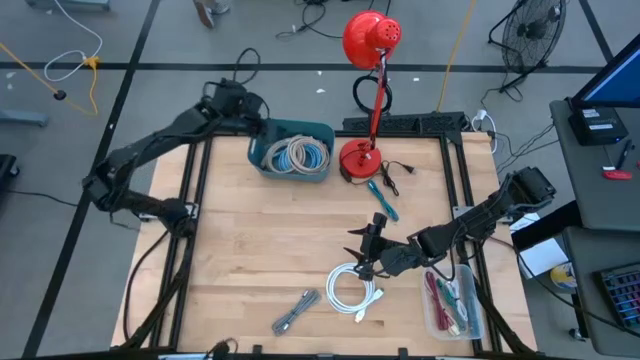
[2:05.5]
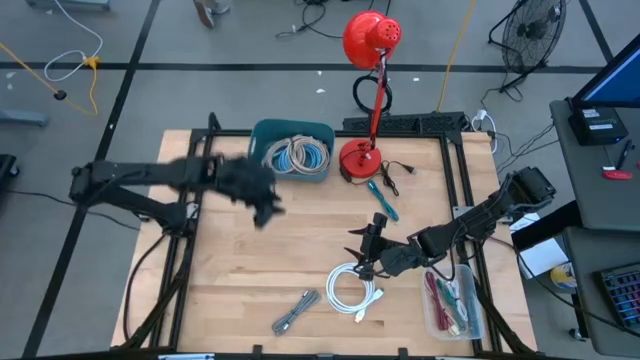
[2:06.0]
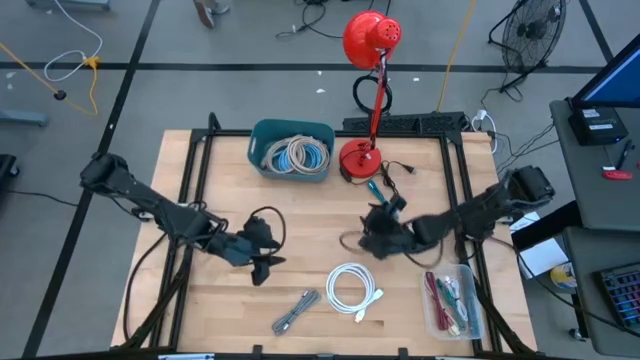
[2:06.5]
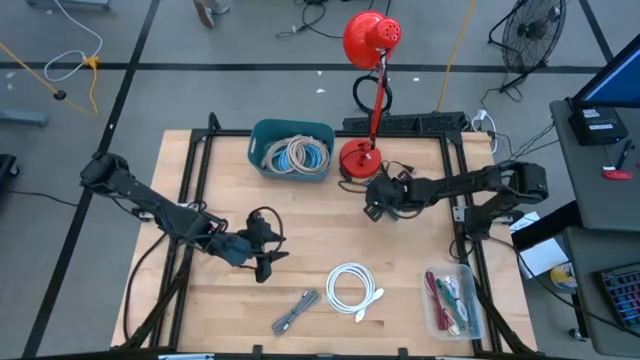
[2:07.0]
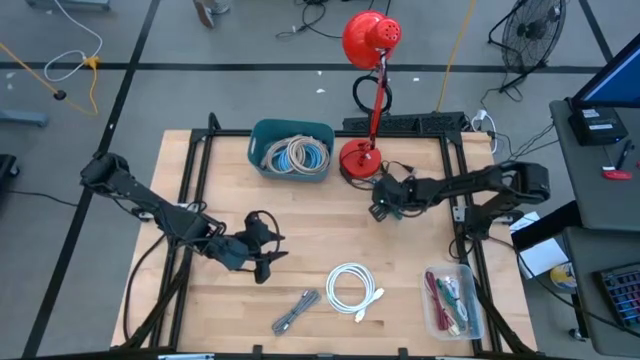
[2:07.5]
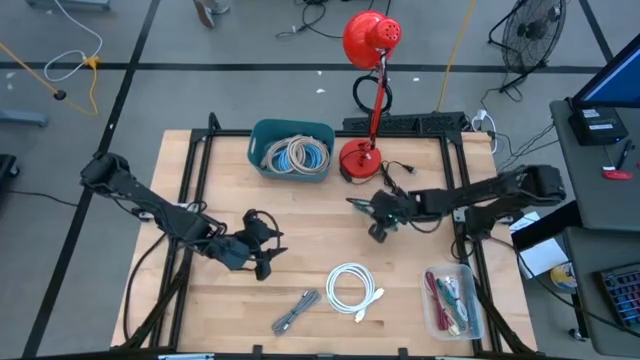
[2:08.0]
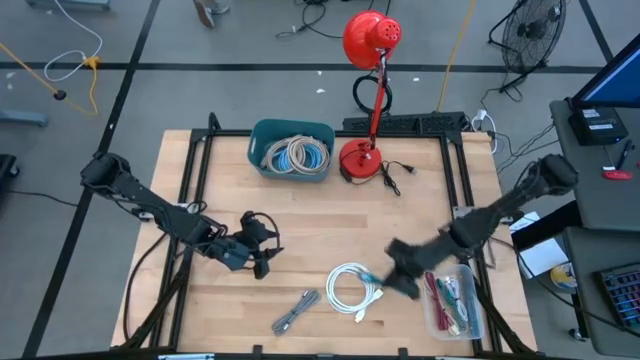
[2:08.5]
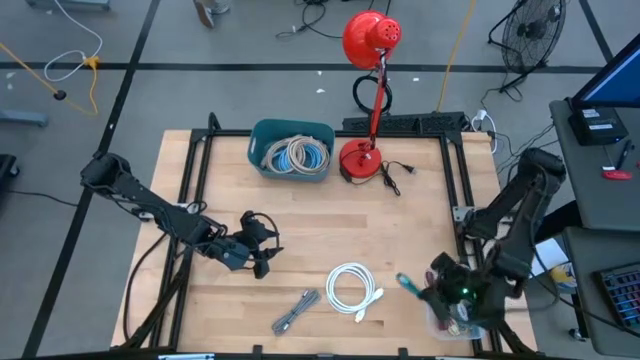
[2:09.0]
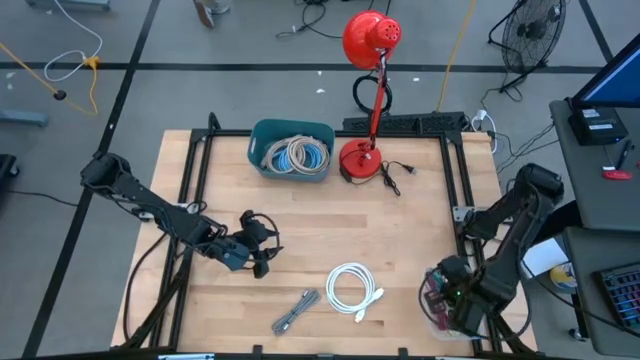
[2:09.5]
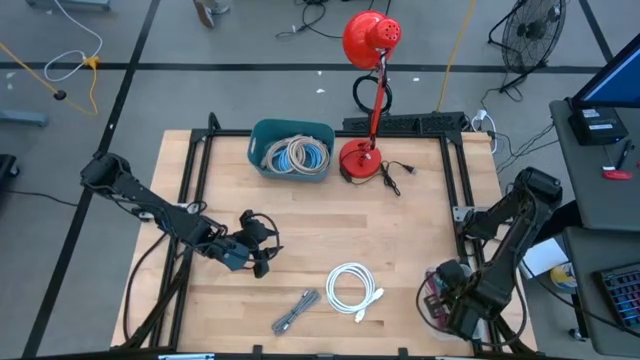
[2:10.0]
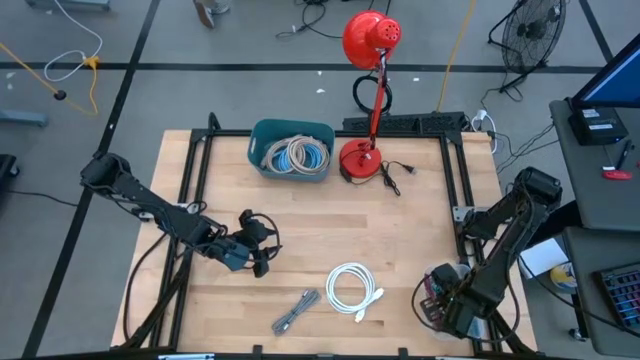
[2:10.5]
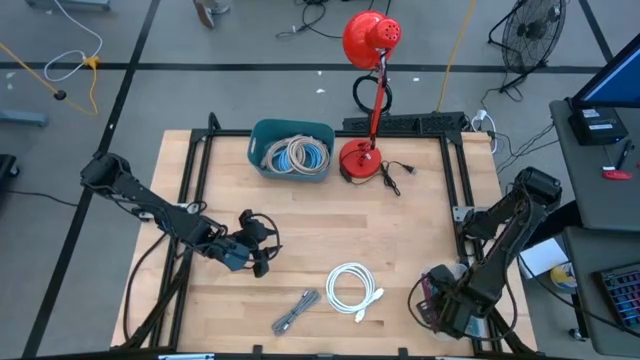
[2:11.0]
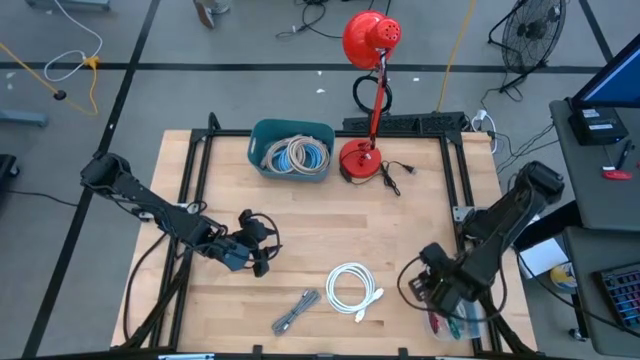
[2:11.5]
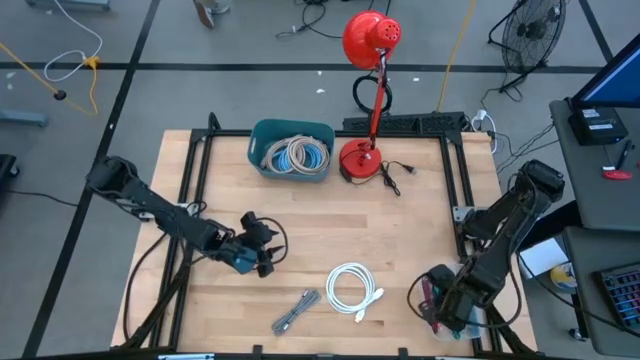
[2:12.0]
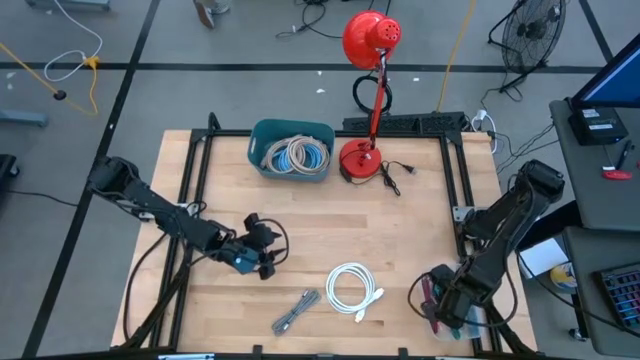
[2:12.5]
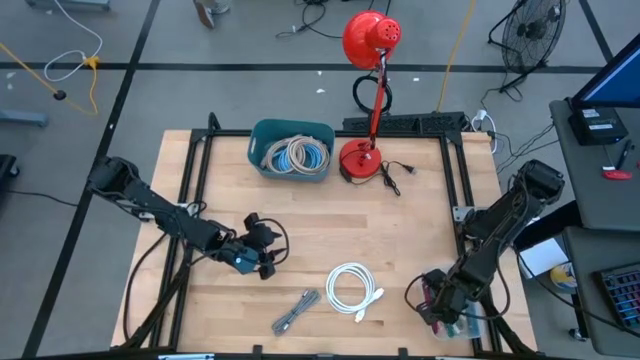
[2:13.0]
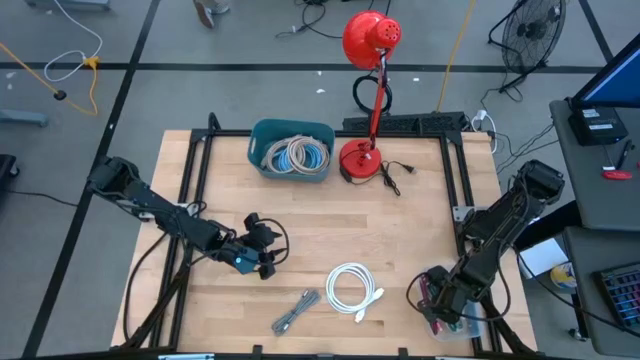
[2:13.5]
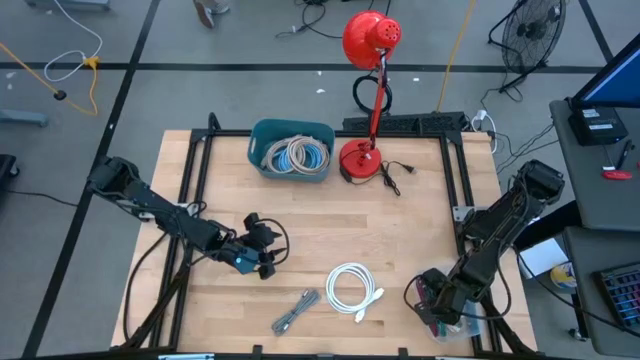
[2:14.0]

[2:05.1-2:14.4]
Task: Pick & Place USB Port
Put the blue charger cable into the transparent bin

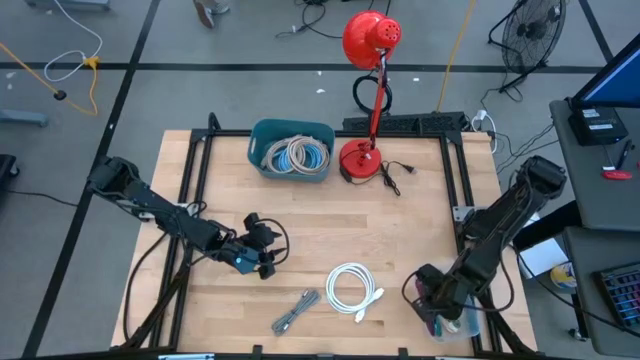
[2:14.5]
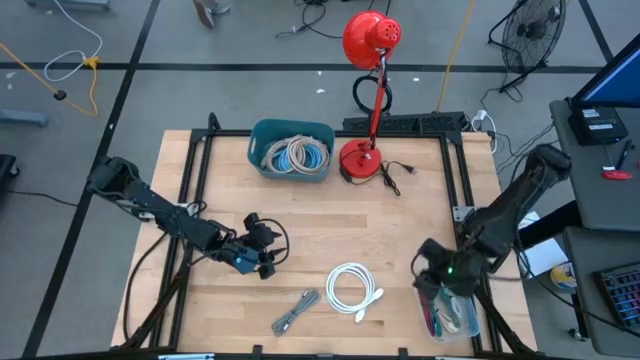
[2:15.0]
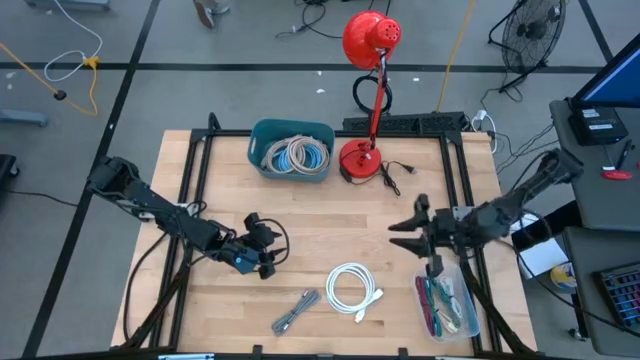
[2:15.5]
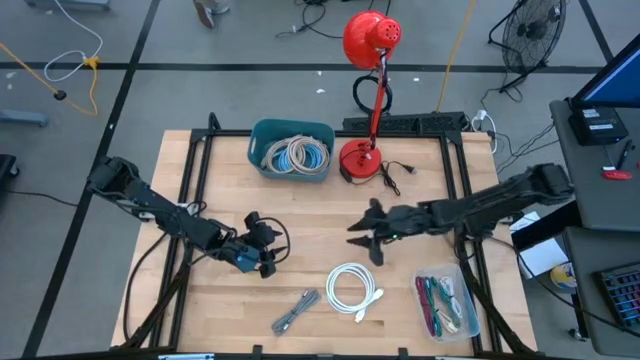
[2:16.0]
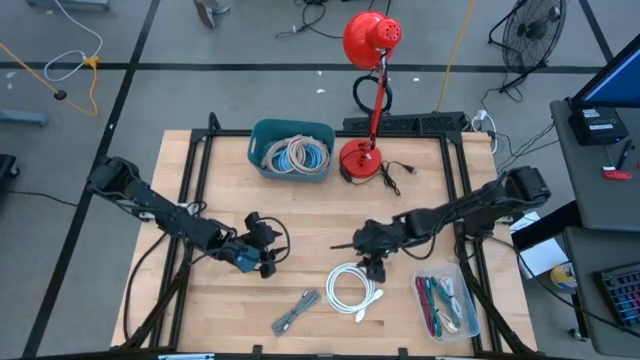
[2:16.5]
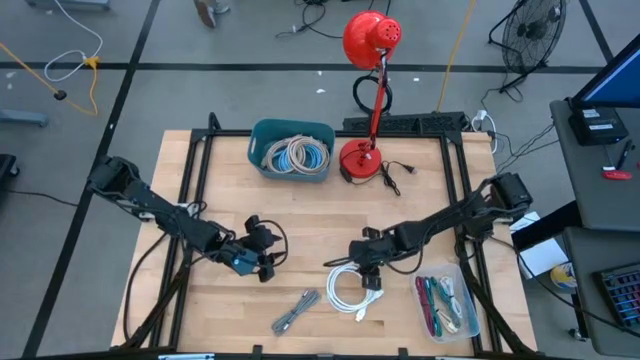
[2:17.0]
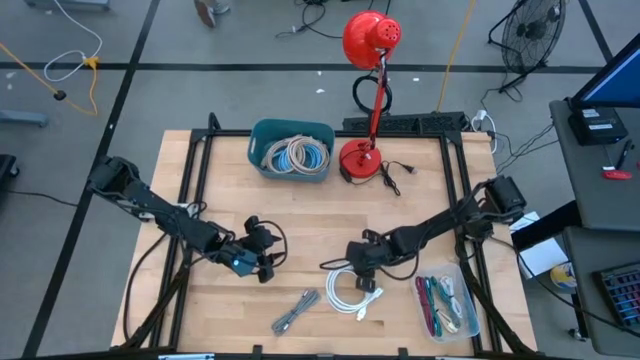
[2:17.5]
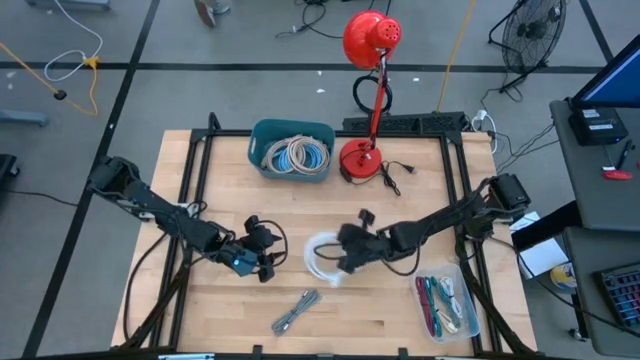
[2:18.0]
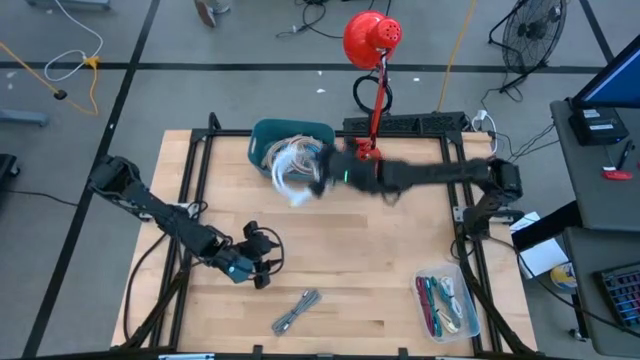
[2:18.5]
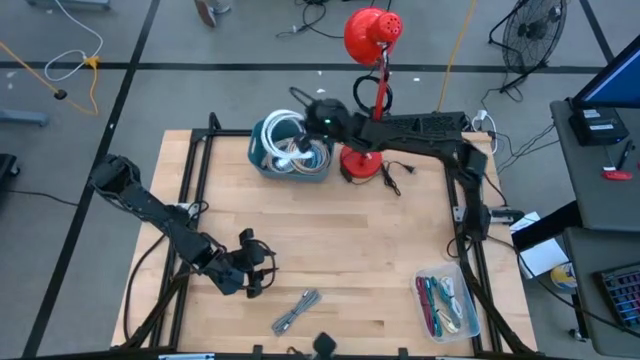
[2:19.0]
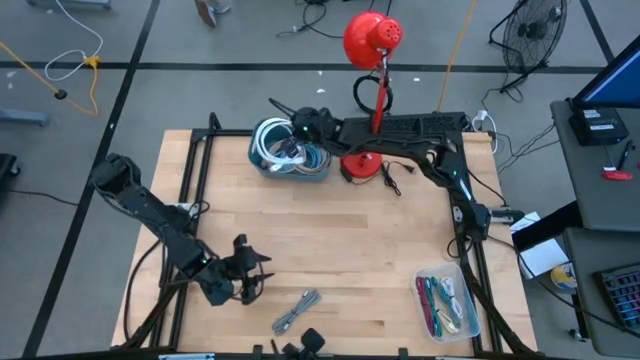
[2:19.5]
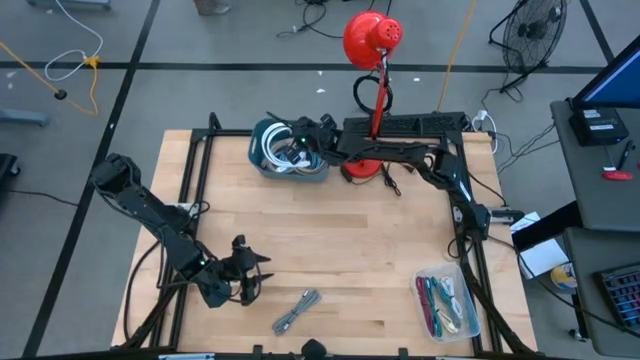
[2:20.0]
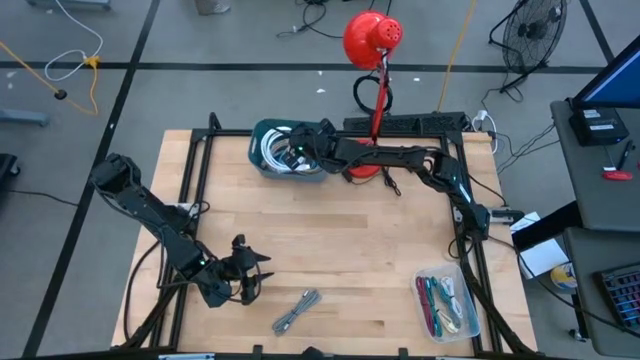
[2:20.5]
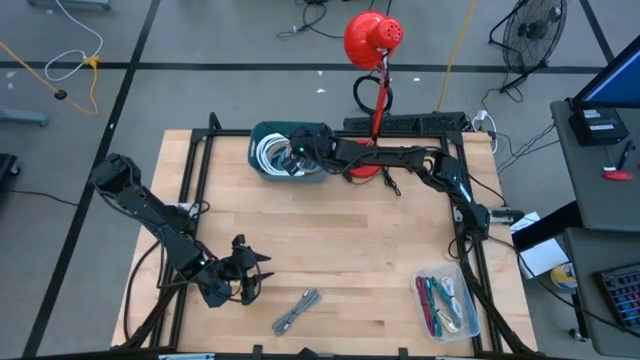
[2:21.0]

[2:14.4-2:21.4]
Put the white hdmi cable into the blue bin

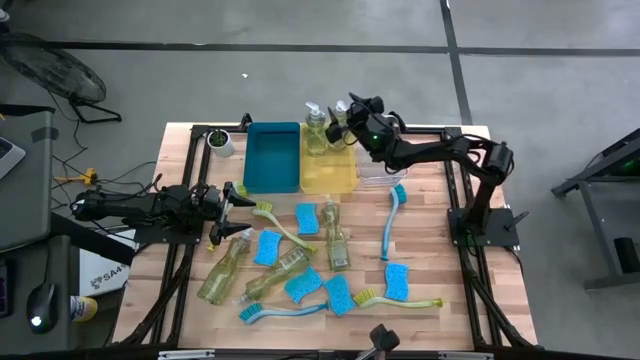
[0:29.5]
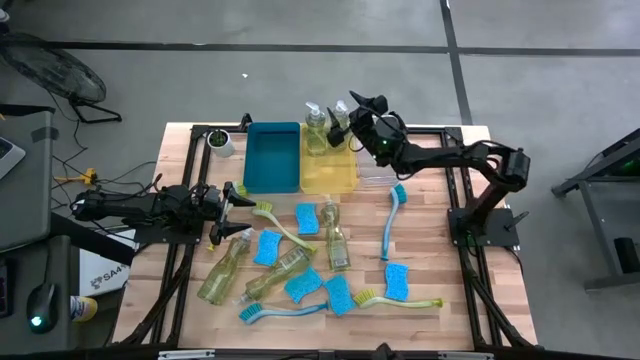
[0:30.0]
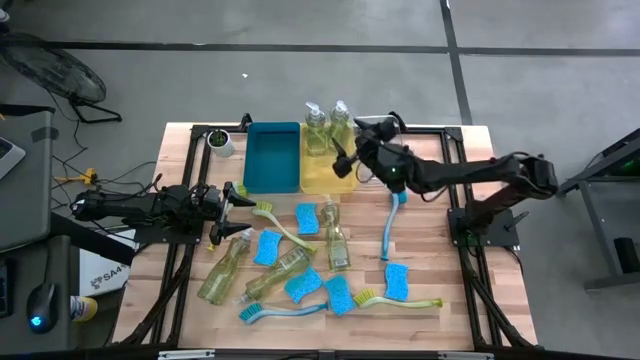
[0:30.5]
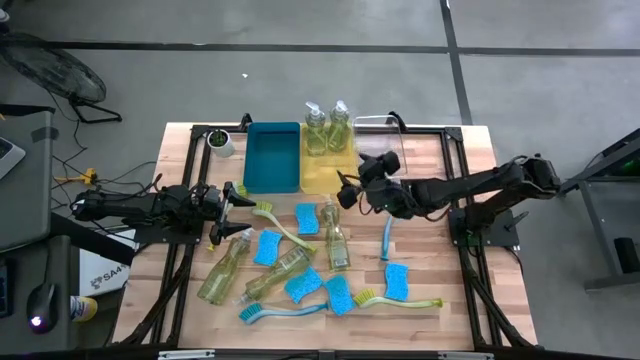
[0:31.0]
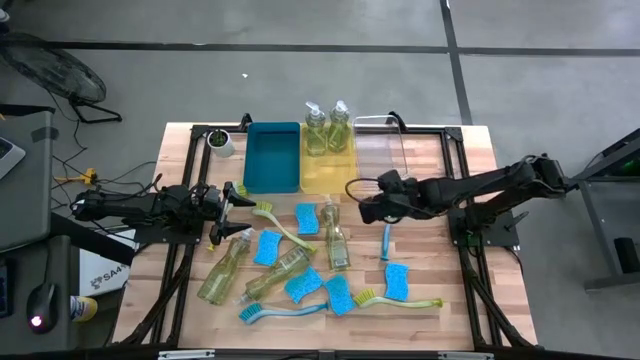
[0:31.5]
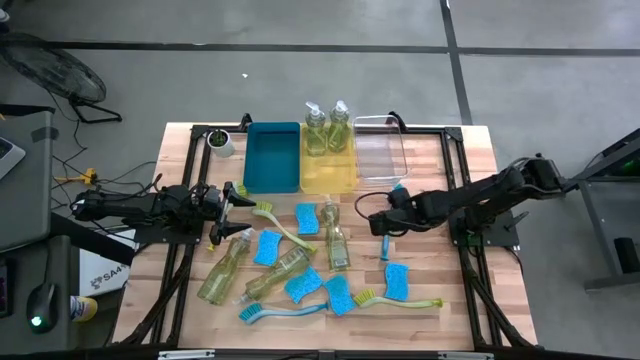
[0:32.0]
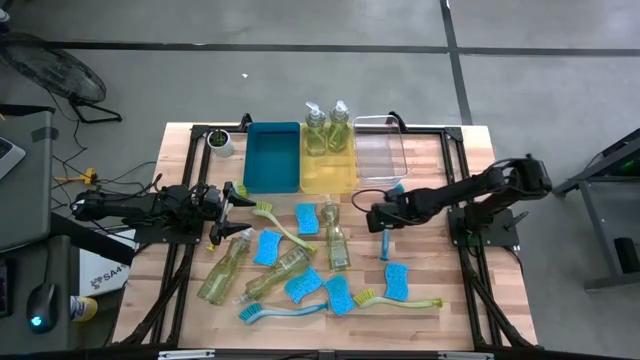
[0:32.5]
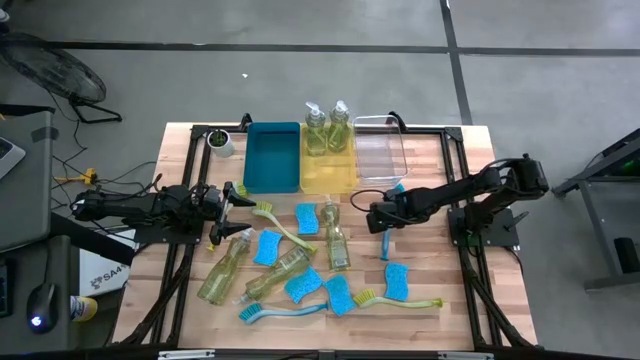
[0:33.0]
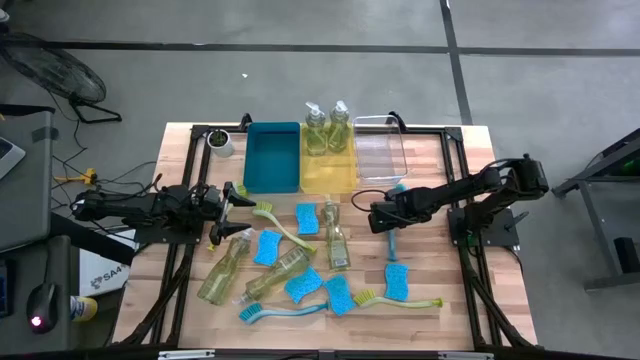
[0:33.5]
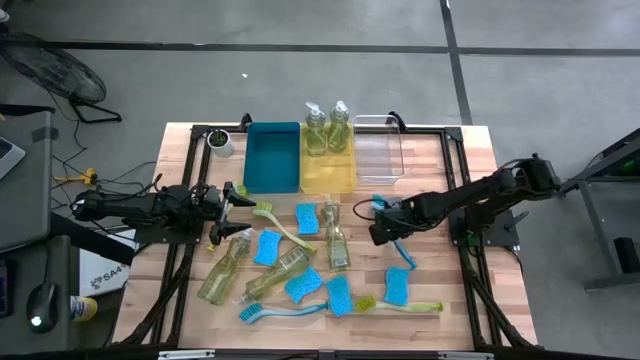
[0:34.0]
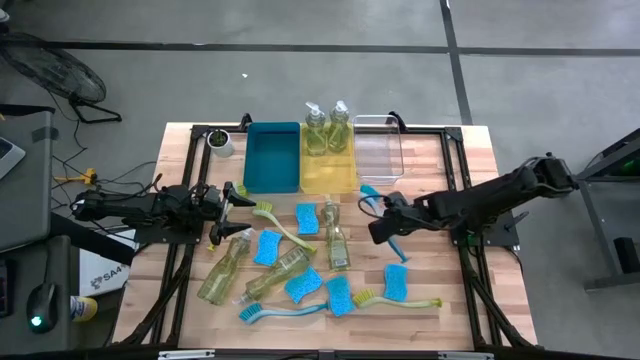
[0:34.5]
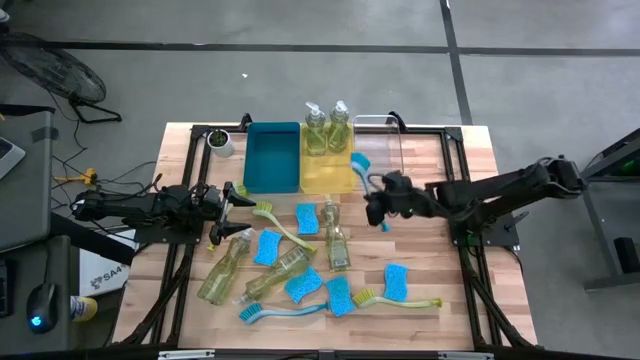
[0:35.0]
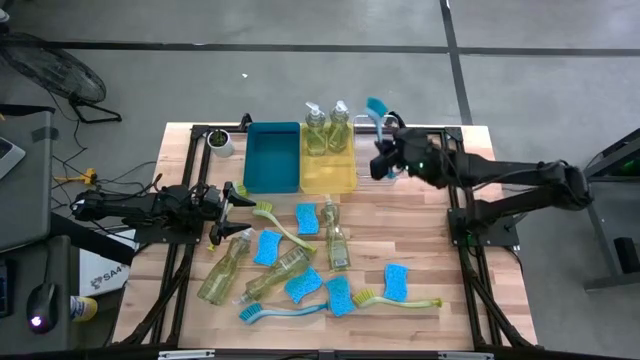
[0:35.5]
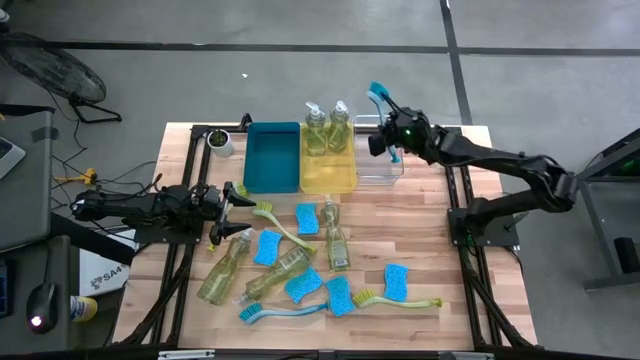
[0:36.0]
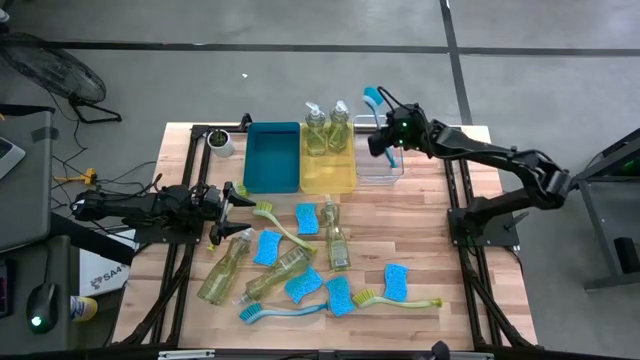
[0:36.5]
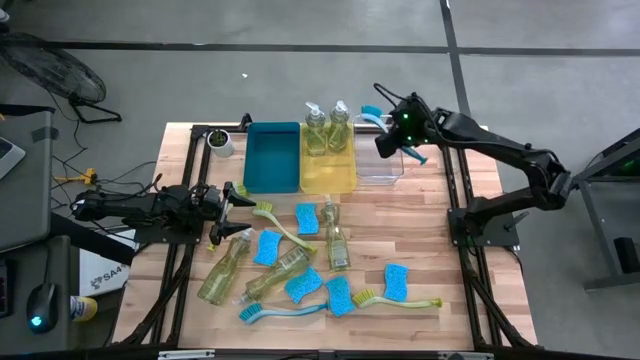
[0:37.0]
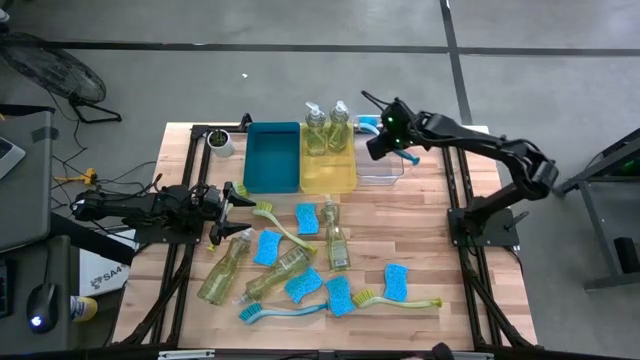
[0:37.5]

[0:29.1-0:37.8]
Task: Pick & Place Kitchen Sink Supplies
Put the blue toilet brush into the transparent bin
